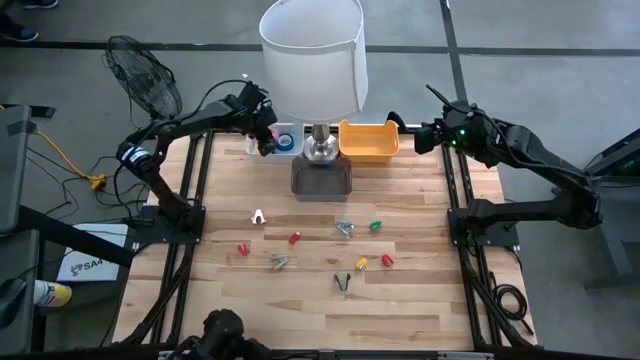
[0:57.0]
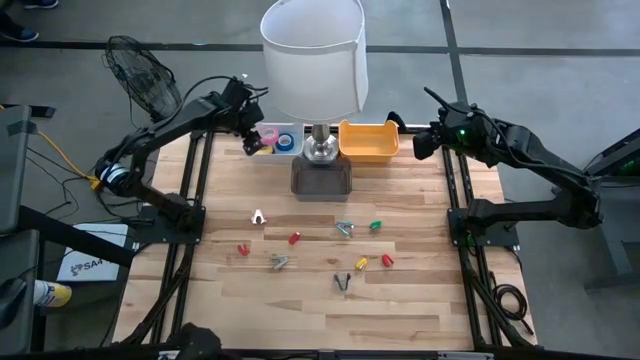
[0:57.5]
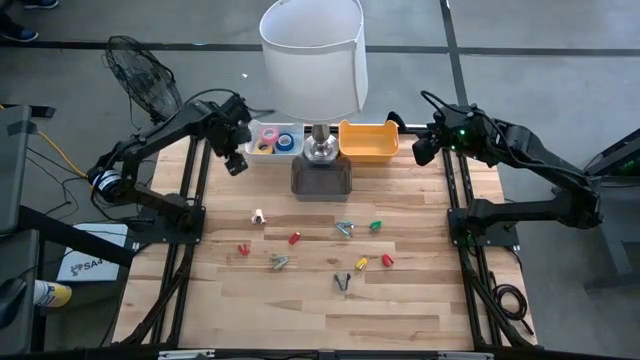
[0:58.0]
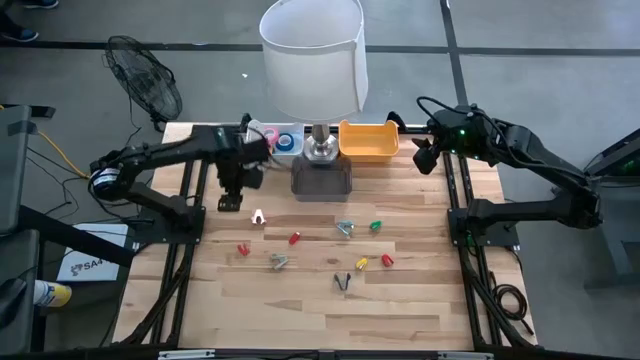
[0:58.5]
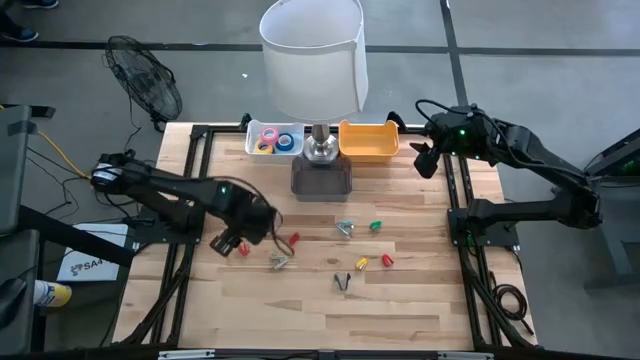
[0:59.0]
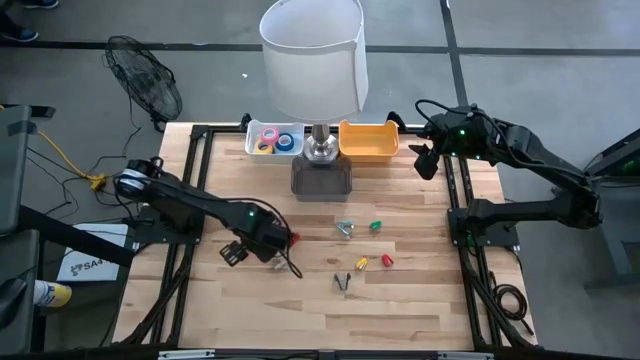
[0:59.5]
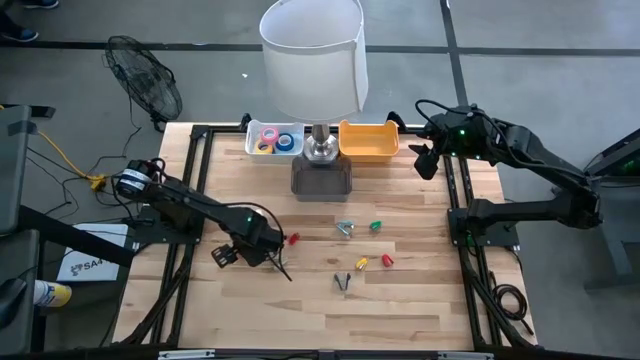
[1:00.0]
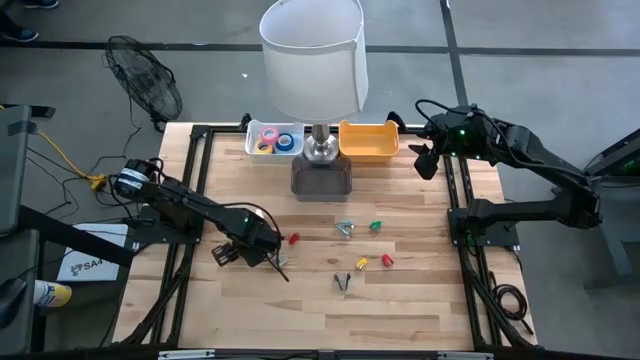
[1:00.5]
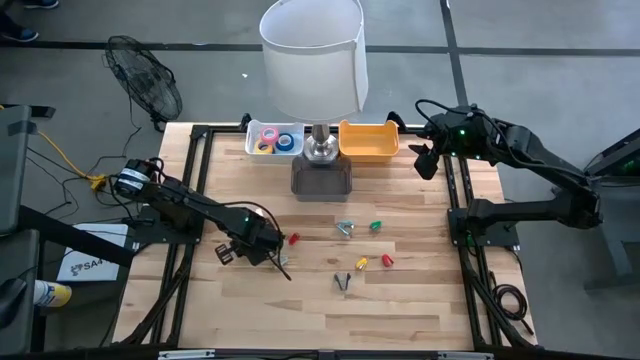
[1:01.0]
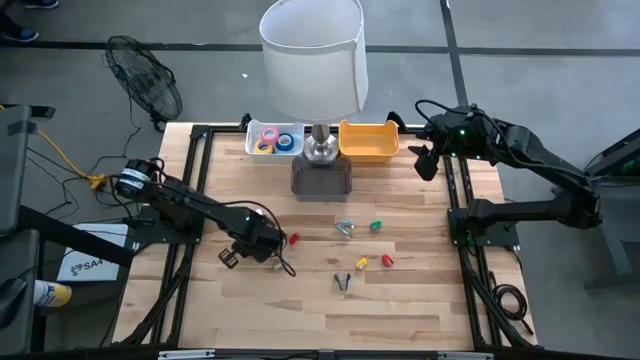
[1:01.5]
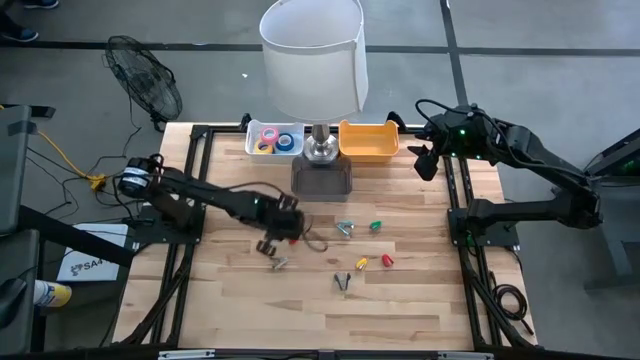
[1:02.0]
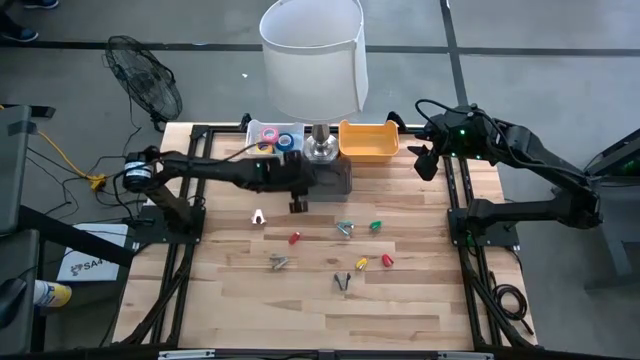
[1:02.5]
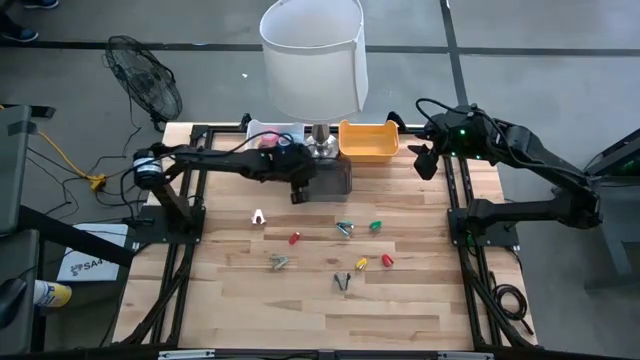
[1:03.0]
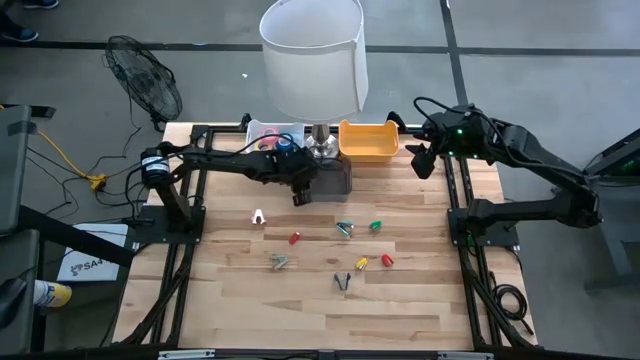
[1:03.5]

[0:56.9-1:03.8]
Task: Pick and place Stapler, Stapler remover, tape
Put the left red stapler into the black bin

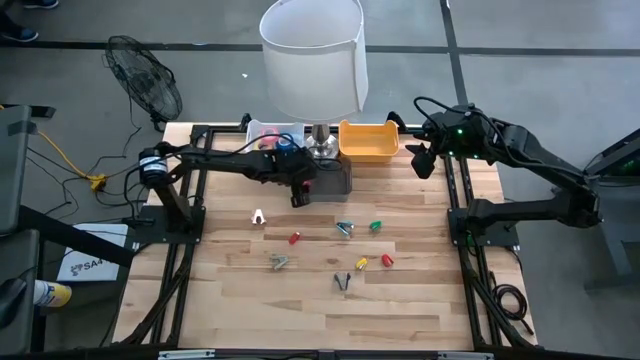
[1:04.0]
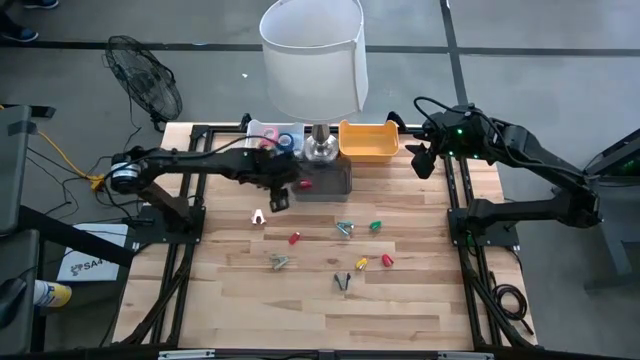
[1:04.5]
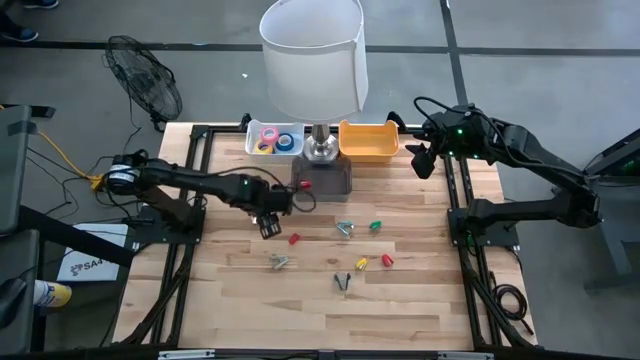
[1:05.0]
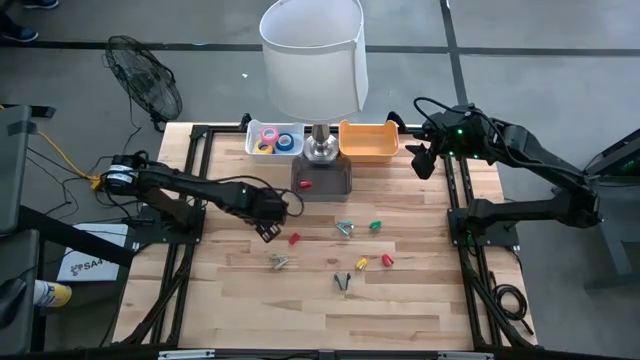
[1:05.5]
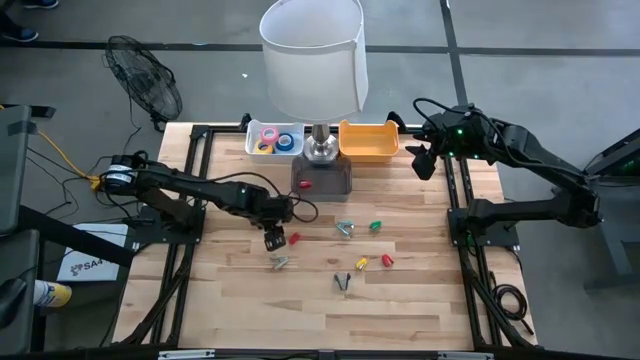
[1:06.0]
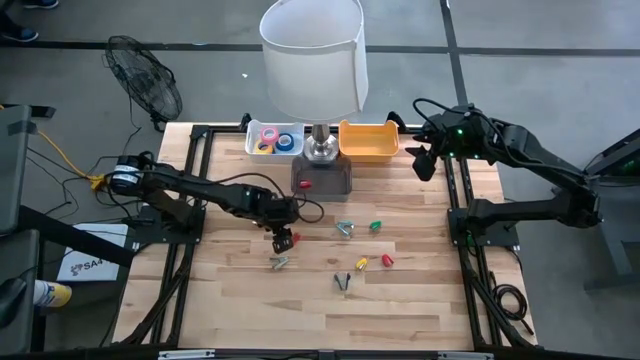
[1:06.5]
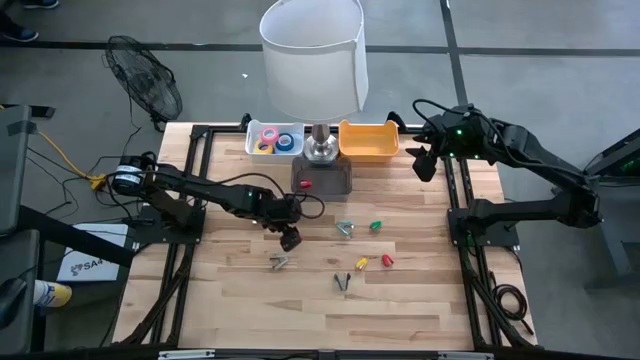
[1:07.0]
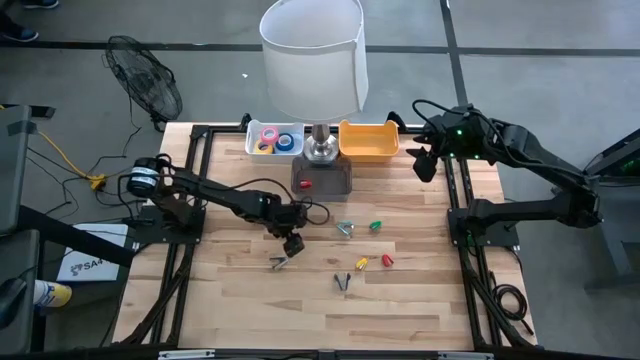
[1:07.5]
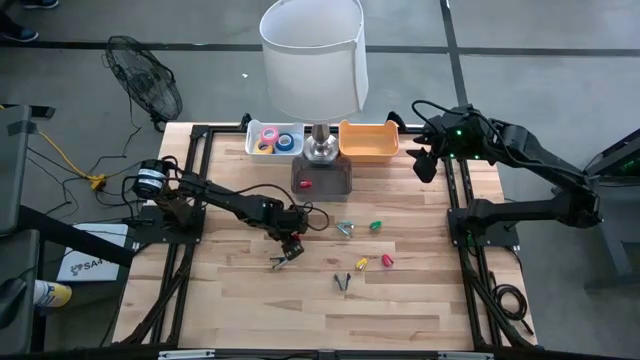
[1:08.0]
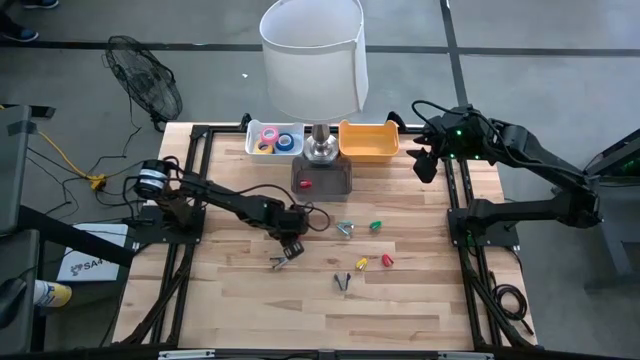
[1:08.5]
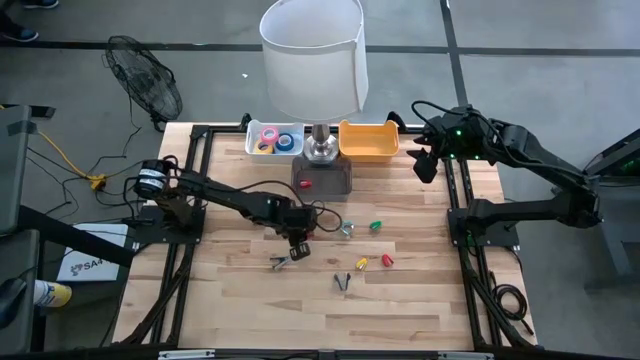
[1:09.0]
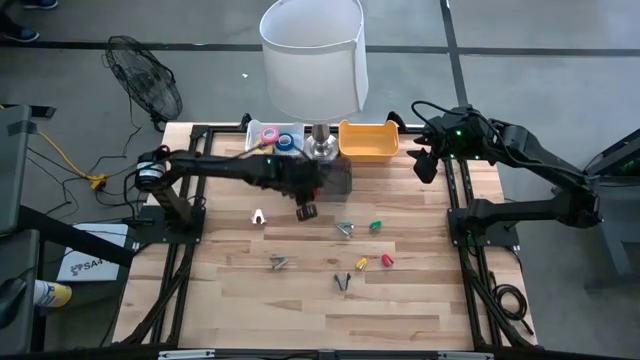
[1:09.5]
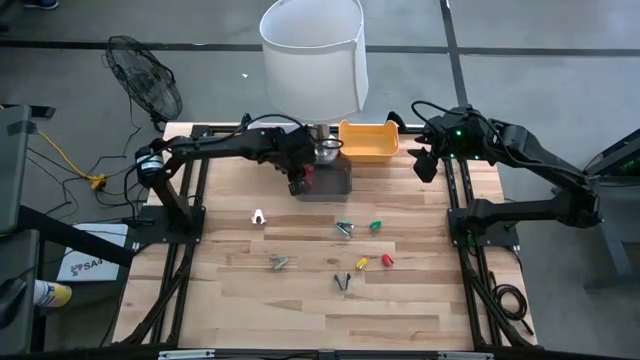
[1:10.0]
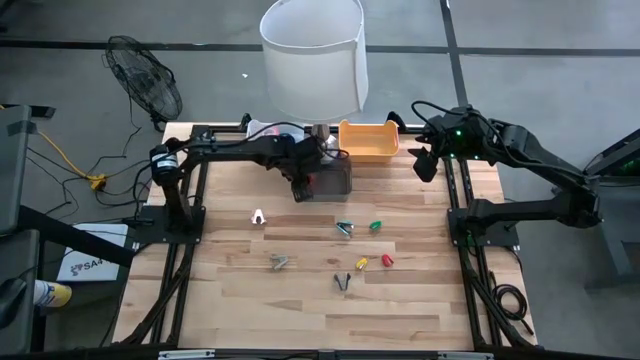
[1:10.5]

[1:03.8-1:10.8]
Put the left red stapler into the black bin

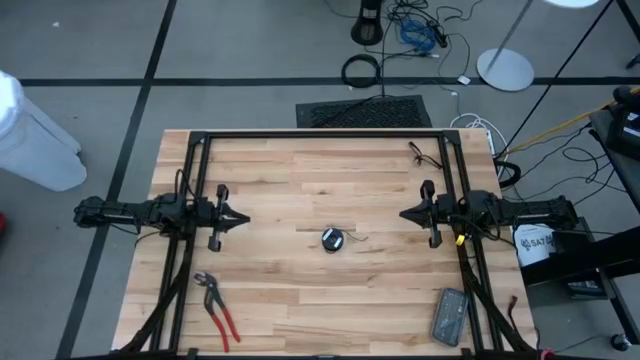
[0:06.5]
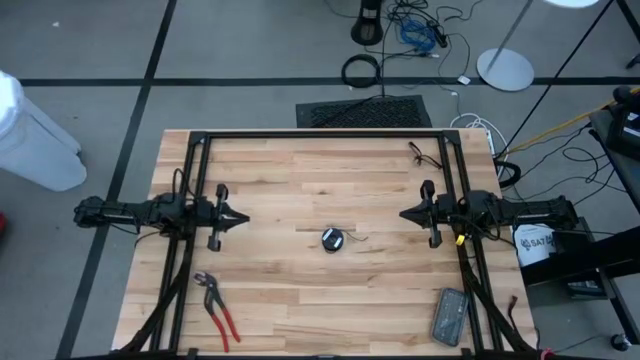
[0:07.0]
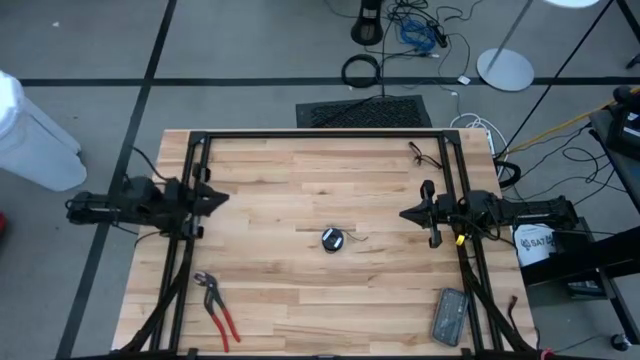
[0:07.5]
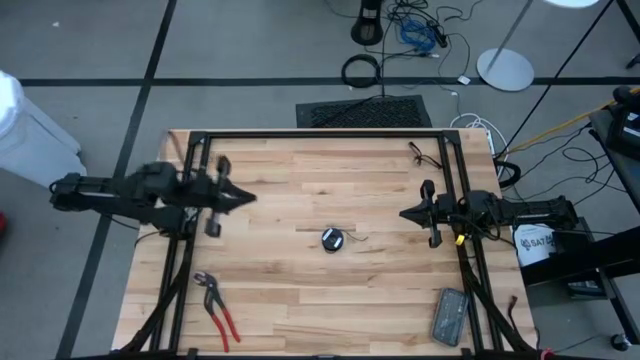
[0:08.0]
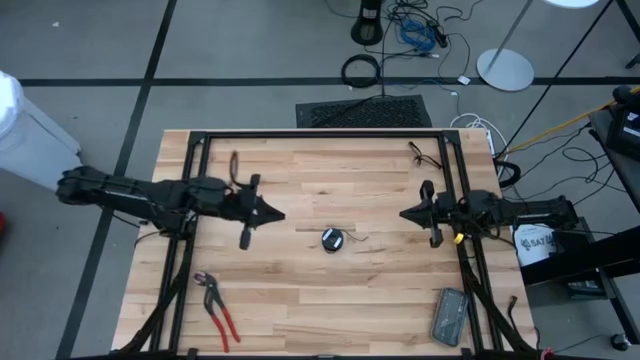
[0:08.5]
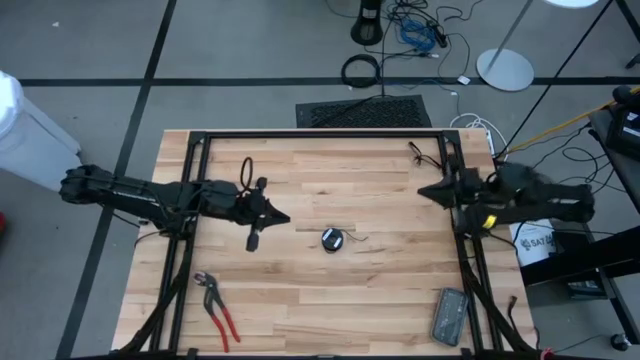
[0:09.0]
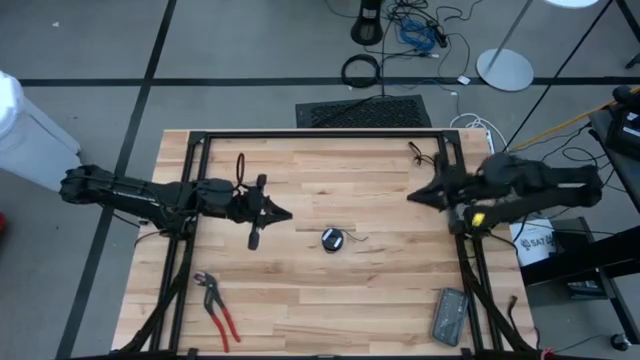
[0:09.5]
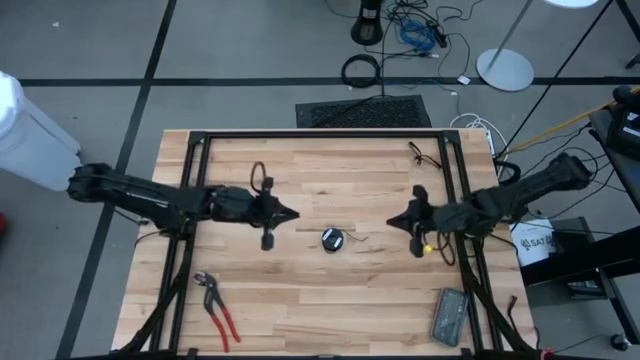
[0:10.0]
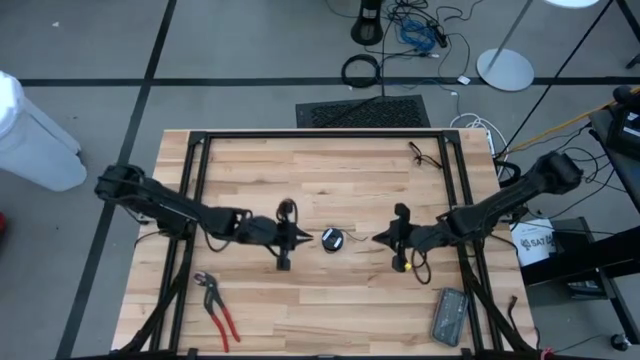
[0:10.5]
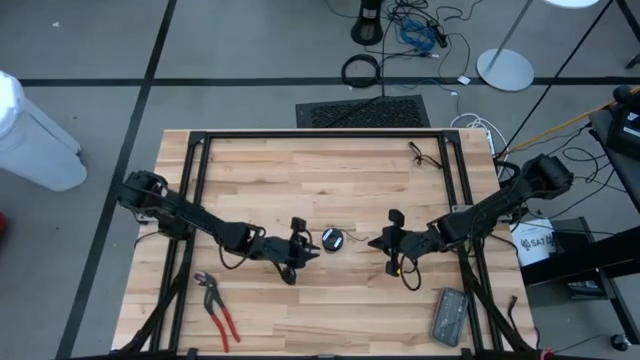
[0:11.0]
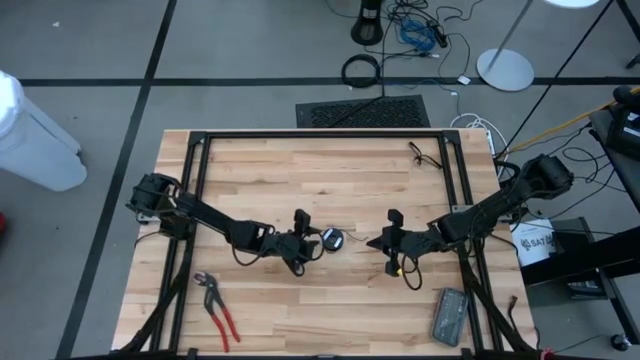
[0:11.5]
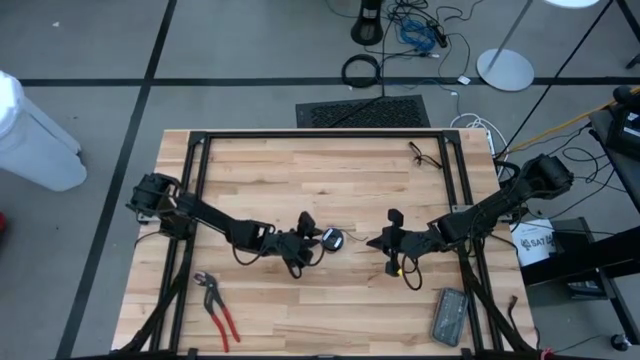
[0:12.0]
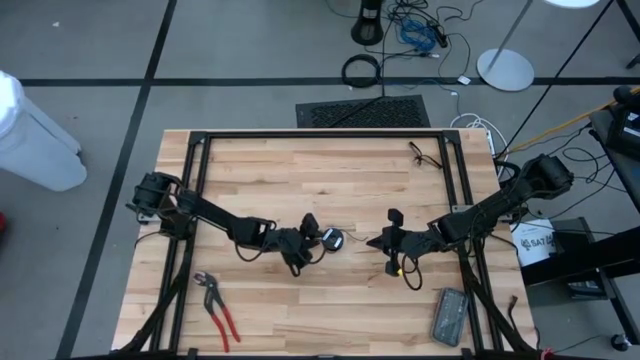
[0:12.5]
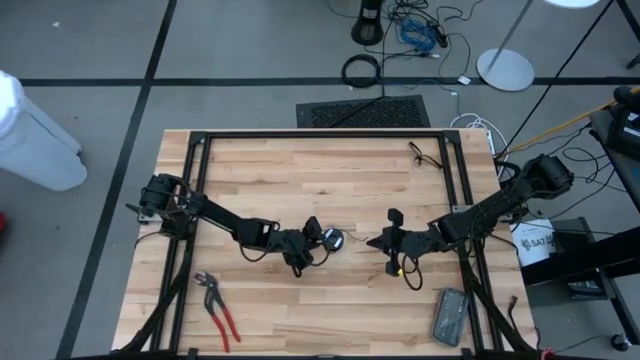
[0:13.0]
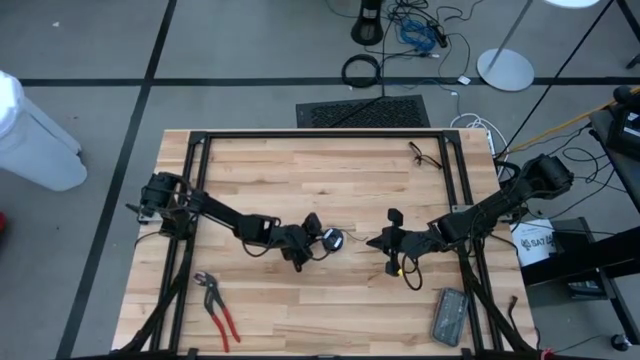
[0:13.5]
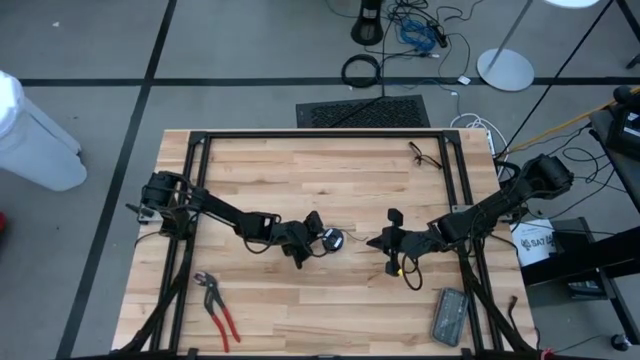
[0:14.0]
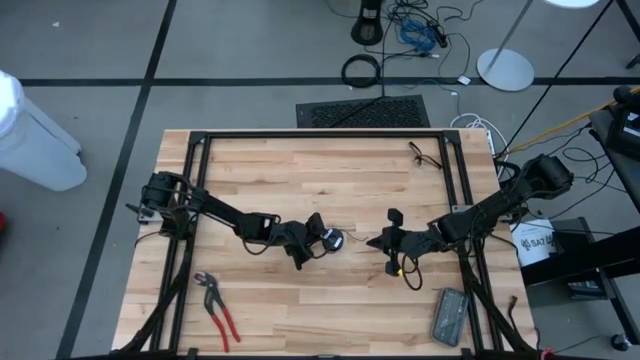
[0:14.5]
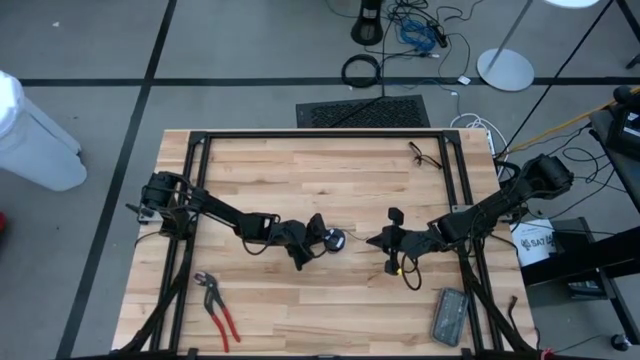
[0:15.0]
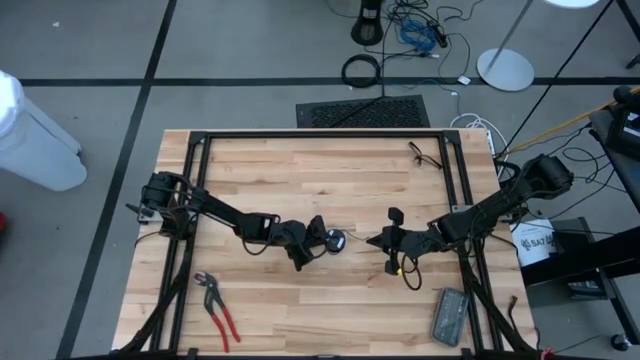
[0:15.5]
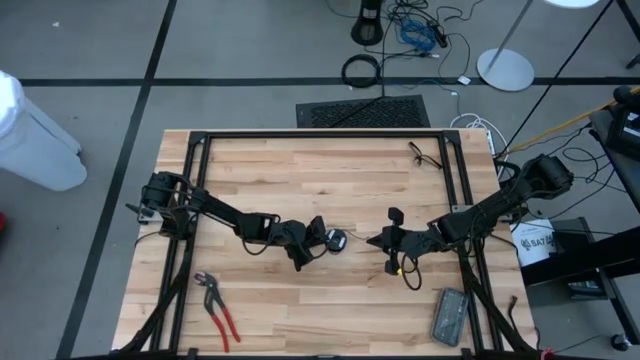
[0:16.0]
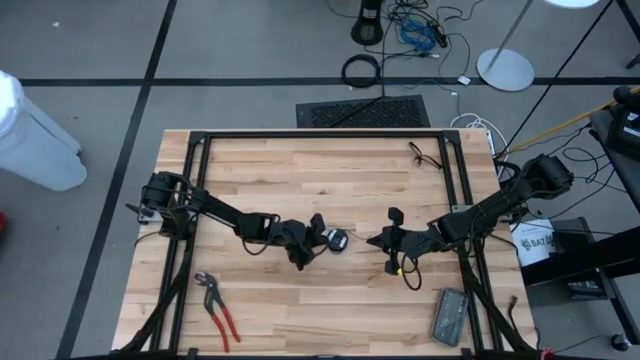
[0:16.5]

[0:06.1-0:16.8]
Task: Coil cords
Uncoil the black wire from the black spool
